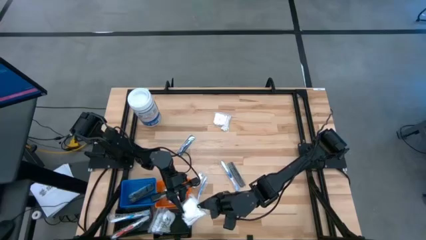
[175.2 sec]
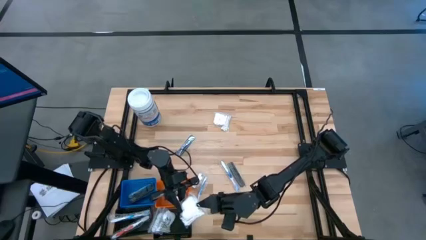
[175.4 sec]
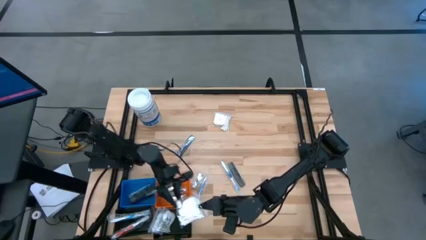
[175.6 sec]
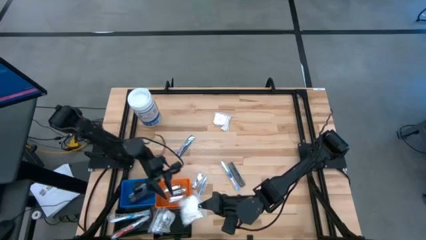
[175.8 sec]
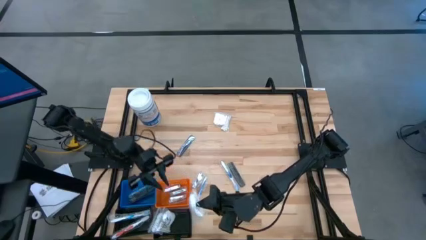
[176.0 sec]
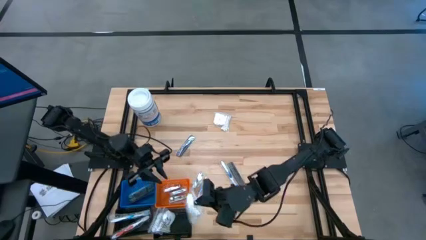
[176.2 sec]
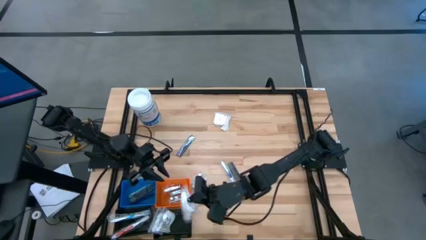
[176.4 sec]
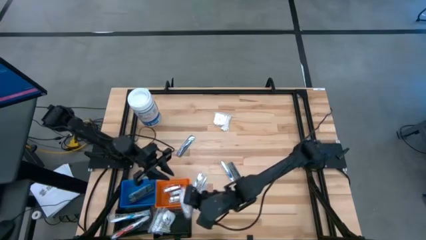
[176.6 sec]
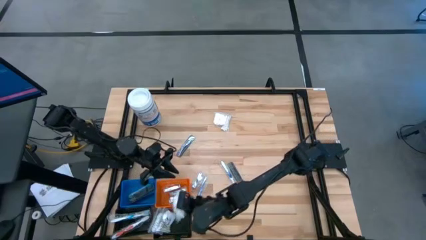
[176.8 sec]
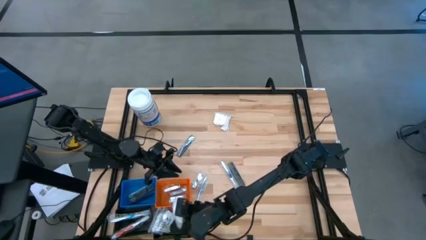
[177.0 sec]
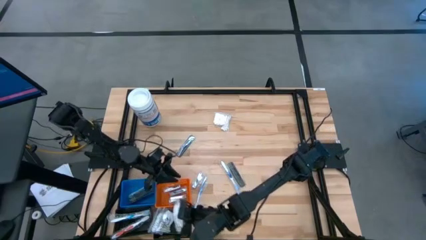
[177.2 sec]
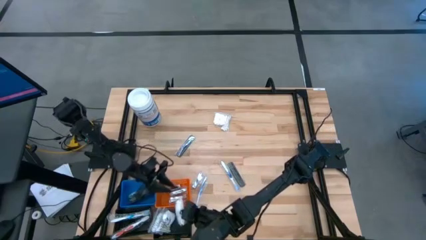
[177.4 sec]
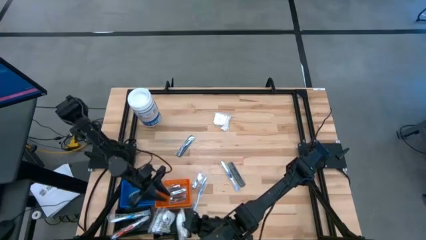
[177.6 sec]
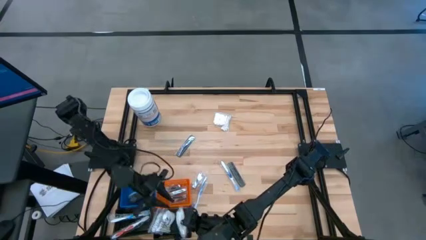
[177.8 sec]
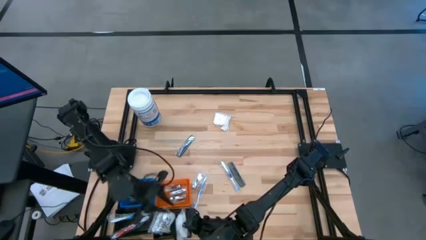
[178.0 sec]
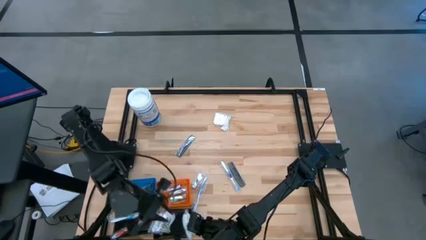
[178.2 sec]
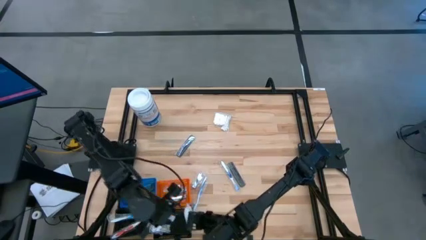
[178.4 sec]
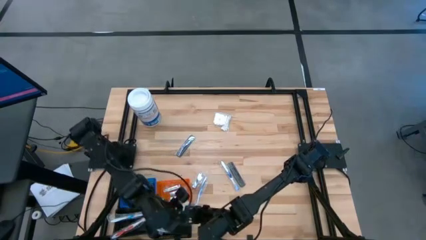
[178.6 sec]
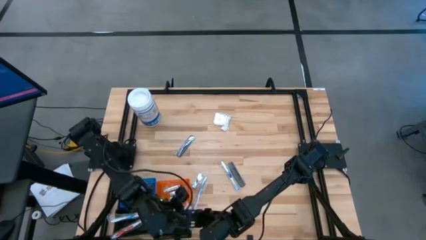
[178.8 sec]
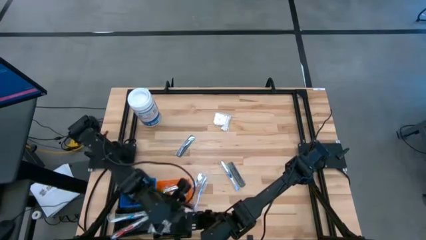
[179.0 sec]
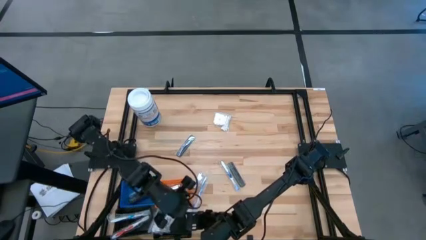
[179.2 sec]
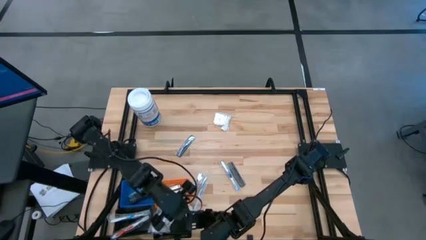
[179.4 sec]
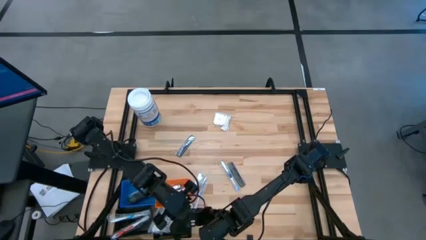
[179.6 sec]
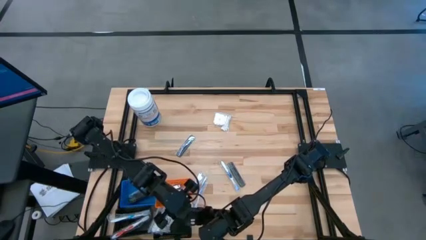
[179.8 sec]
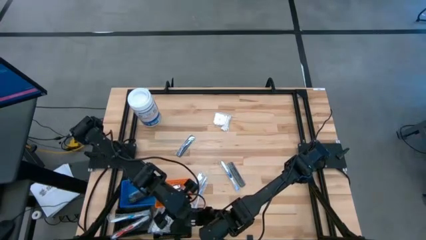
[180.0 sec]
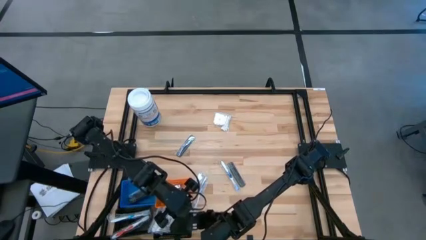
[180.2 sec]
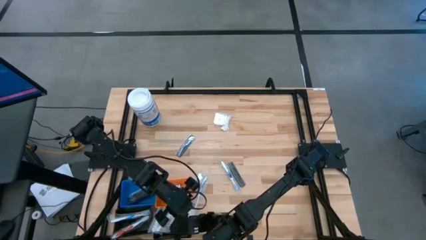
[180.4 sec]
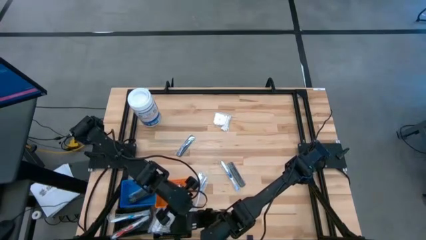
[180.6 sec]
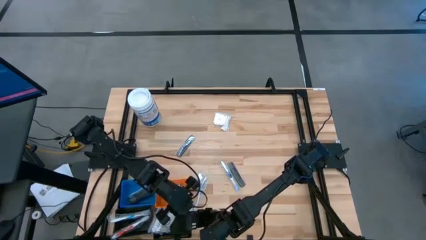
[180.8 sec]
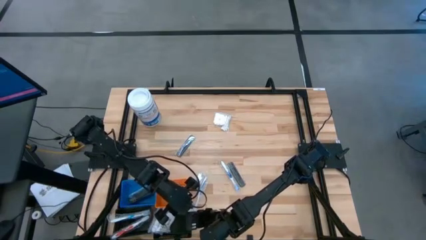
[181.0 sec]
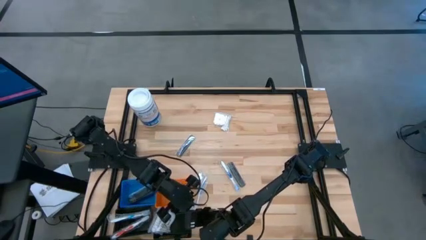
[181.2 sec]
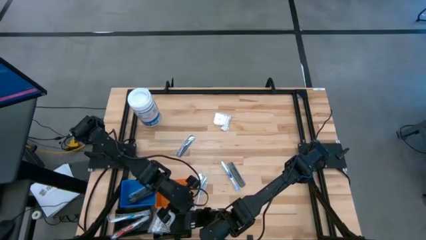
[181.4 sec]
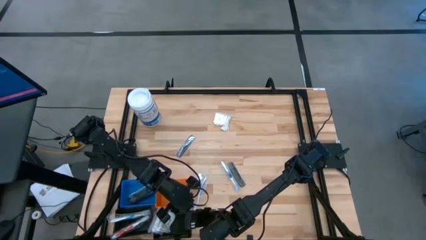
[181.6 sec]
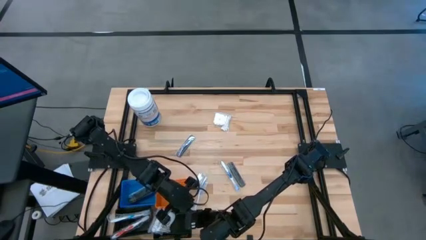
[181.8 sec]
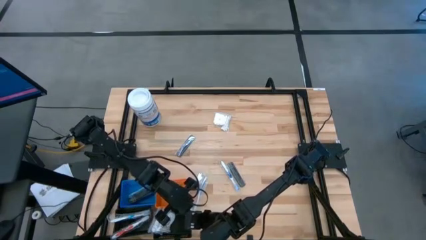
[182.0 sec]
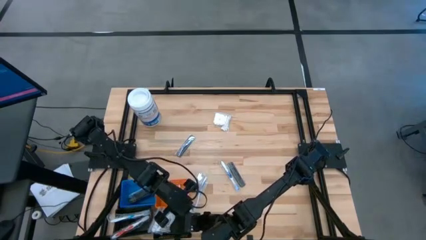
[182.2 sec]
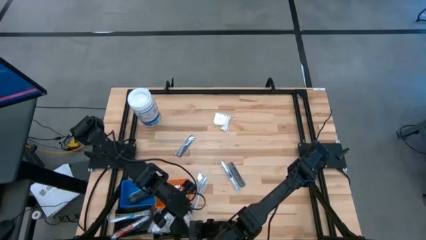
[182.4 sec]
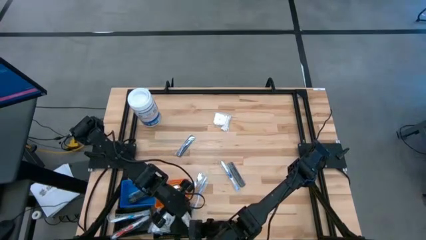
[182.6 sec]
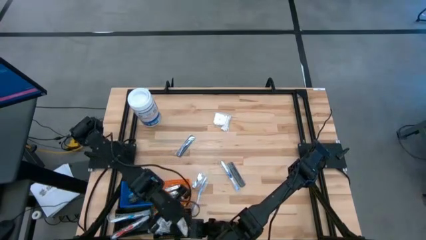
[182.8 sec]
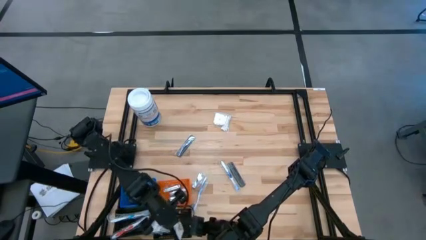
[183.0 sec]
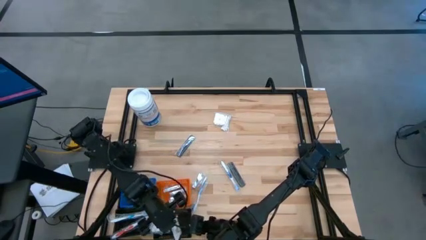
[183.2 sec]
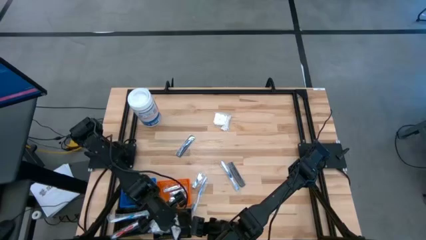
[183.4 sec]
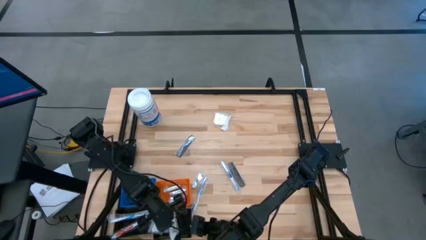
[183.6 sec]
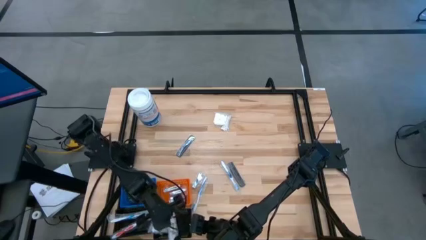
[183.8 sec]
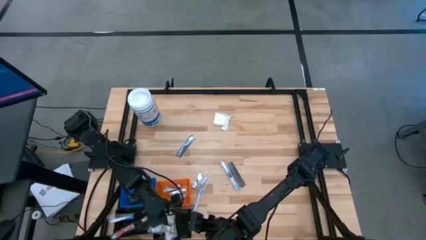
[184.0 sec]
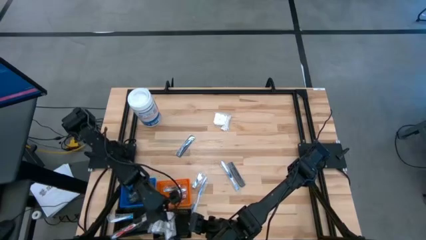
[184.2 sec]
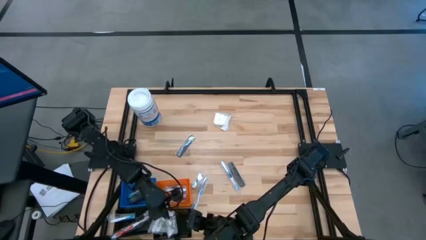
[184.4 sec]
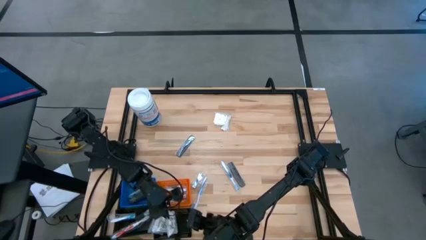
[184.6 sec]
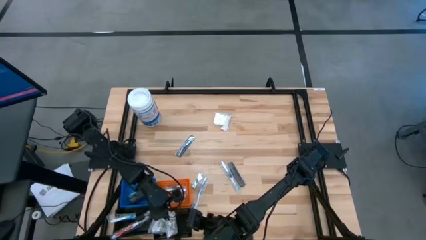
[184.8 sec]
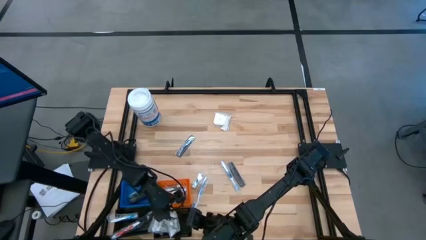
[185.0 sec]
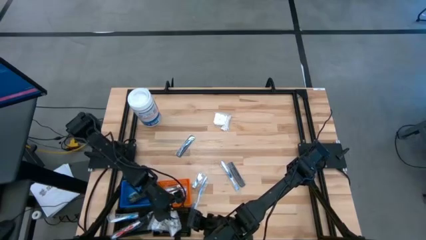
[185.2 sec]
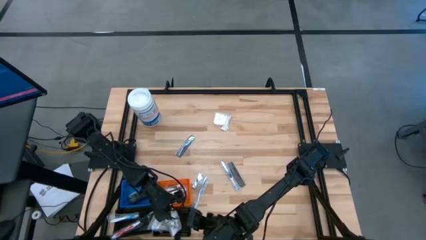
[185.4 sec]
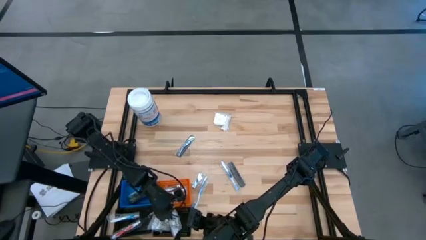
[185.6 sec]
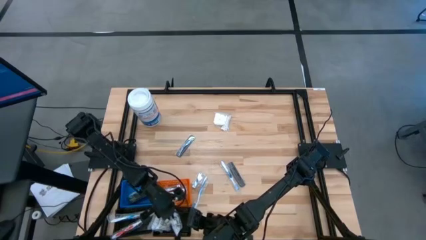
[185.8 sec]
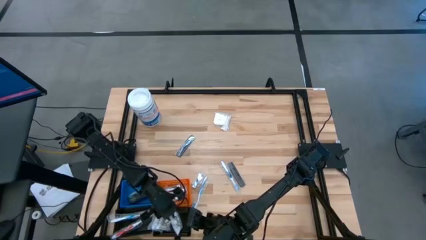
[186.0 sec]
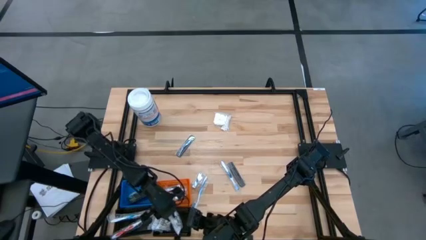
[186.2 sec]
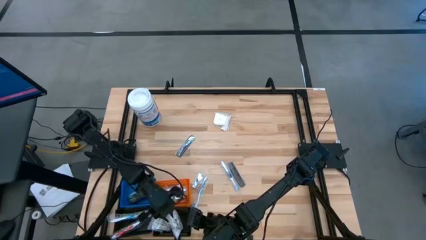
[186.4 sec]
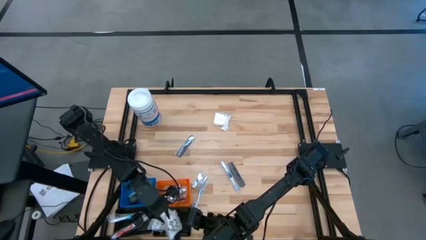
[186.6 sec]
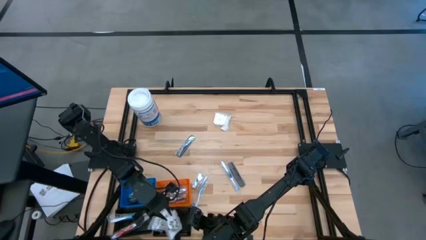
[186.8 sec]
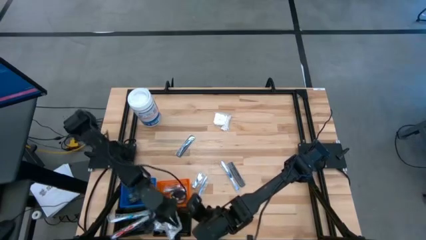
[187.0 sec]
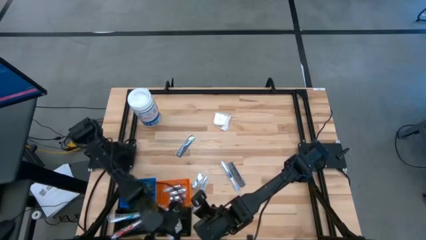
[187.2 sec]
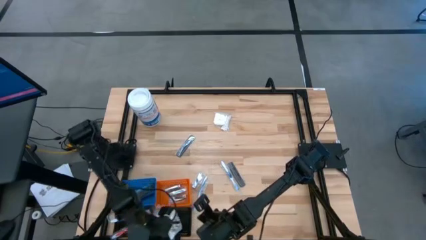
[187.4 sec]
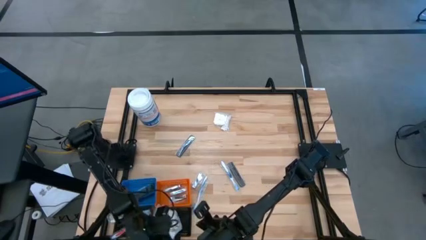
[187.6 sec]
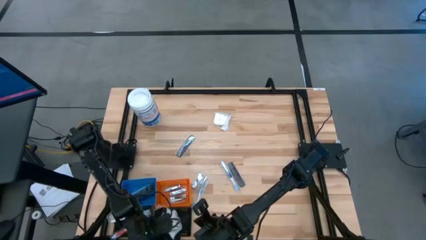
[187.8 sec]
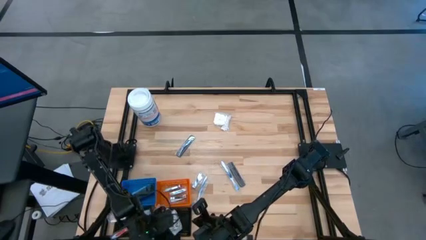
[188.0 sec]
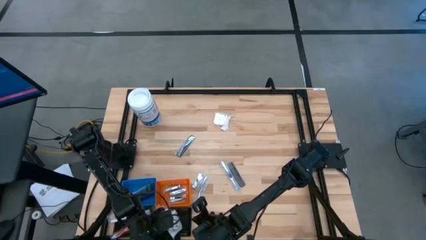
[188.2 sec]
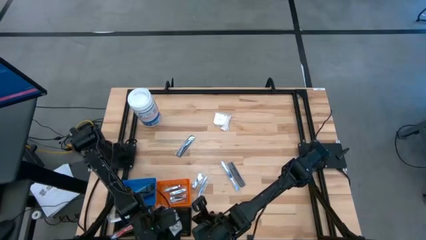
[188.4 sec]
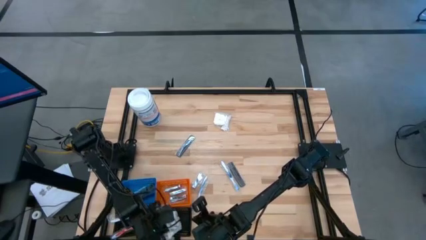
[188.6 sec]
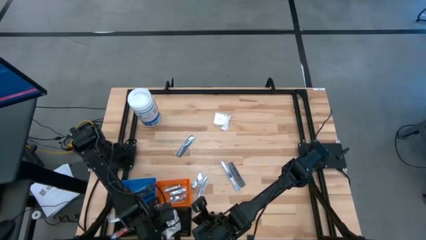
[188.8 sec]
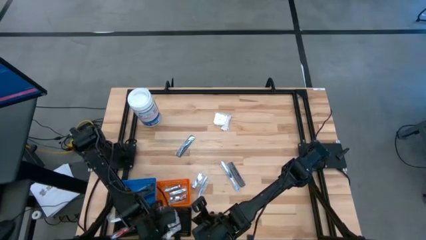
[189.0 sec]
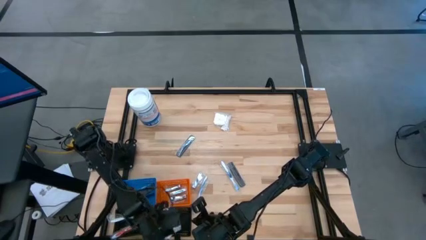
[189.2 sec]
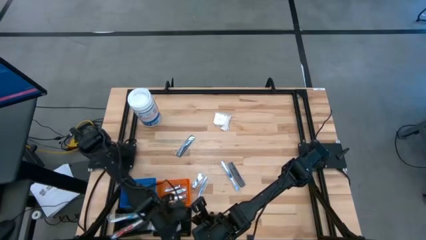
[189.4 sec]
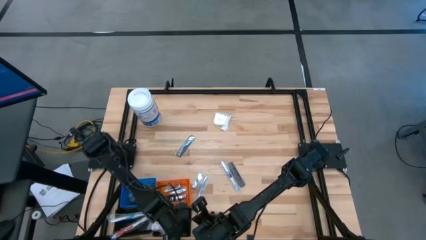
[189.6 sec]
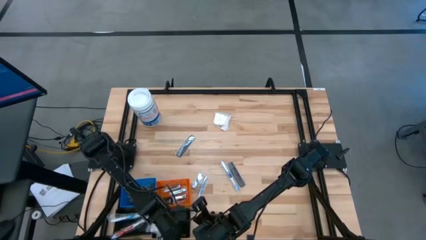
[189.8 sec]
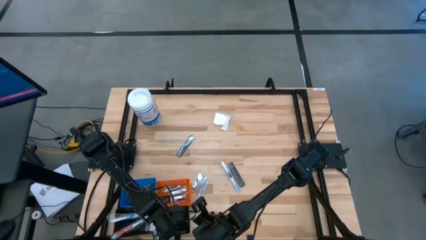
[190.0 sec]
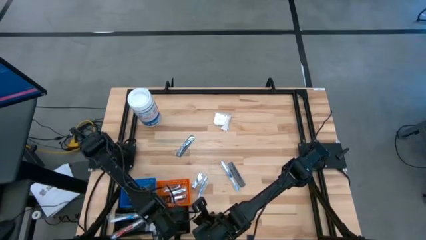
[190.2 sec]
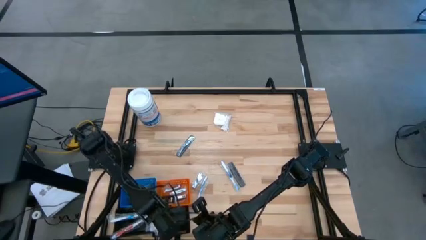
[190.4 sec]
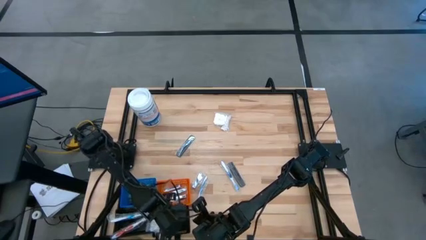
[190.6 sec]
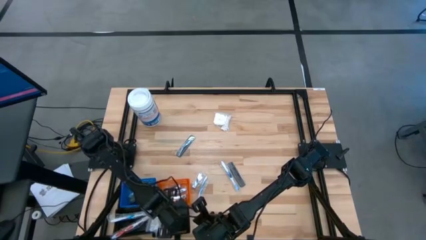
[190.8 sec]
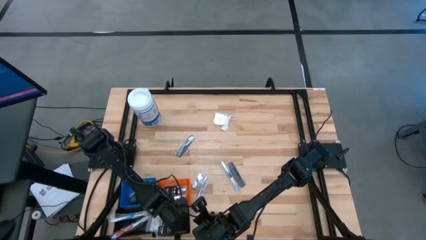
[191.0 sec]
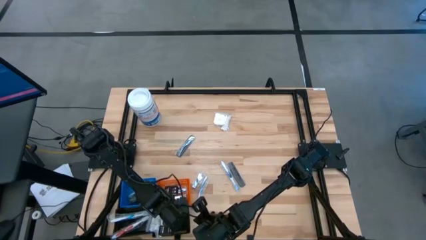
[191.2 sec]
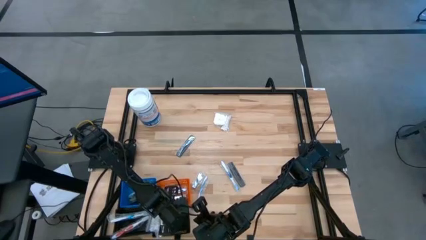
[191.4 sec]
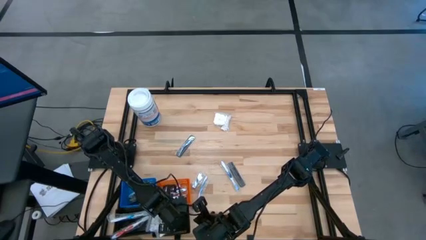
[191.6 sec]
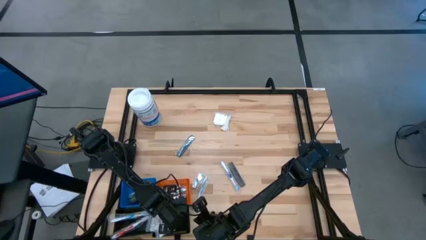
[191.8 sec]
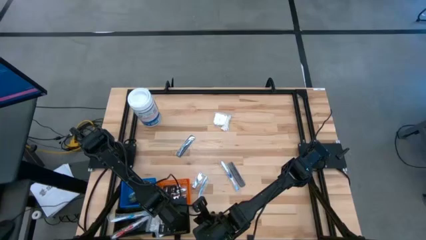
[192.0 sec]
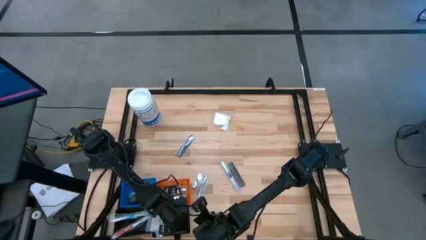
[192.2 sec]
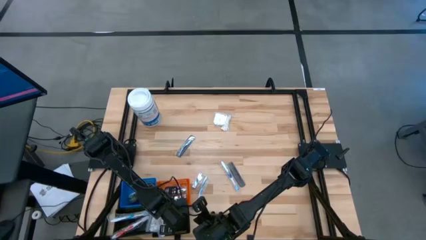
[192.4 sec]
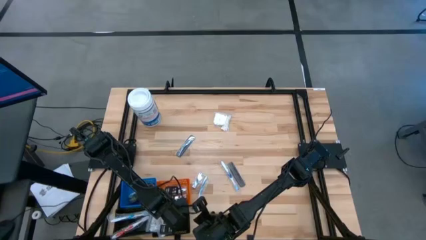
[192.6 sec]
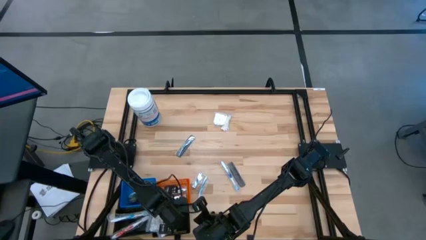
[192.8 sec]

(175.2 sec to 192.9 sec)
Task: Pick & Place Travel size toiletries
Put the bottom cotton pack into the right black basket
